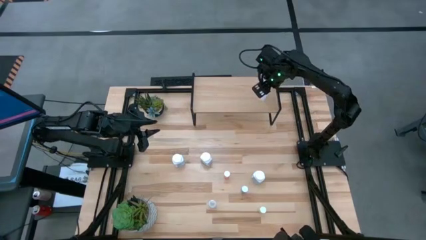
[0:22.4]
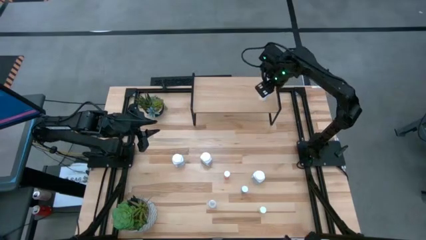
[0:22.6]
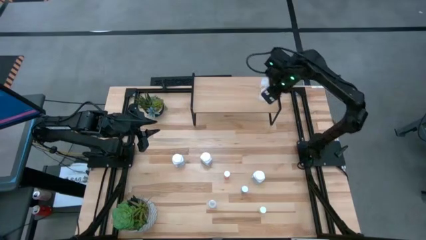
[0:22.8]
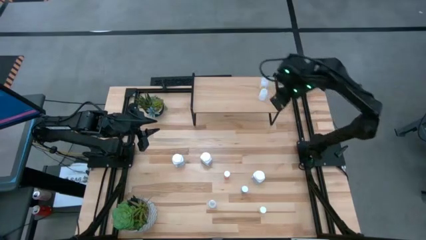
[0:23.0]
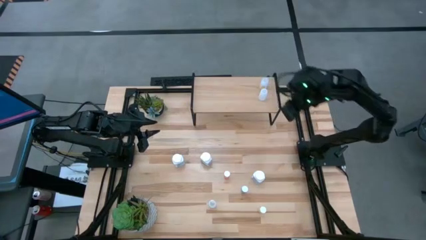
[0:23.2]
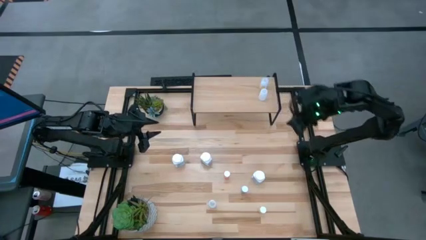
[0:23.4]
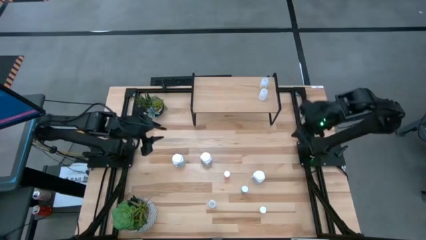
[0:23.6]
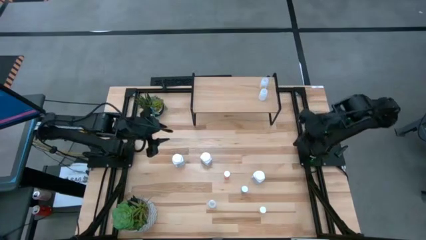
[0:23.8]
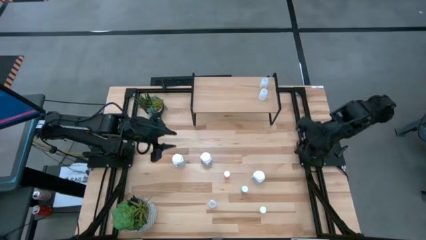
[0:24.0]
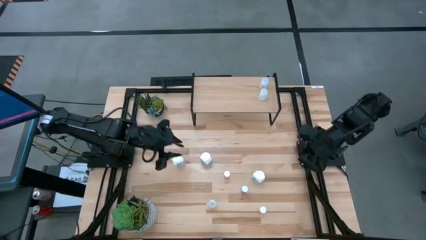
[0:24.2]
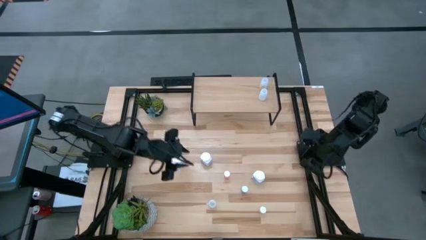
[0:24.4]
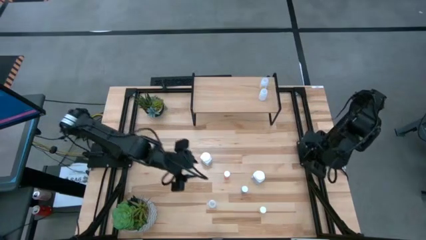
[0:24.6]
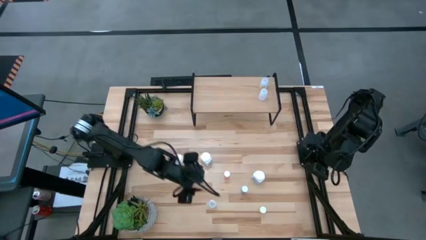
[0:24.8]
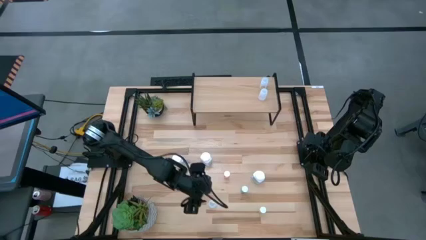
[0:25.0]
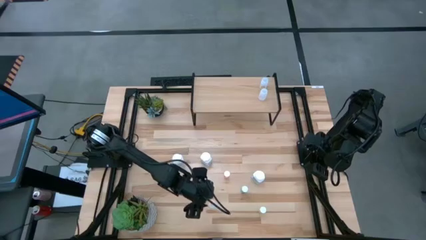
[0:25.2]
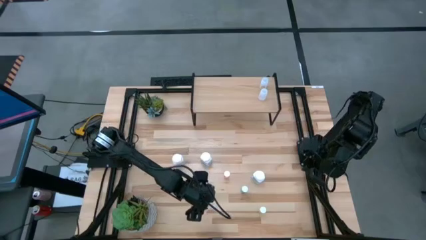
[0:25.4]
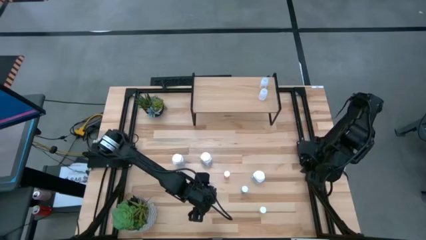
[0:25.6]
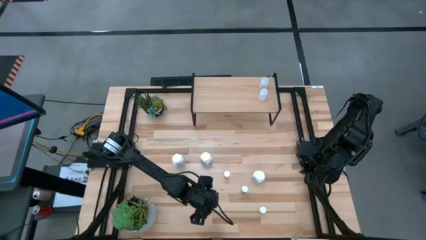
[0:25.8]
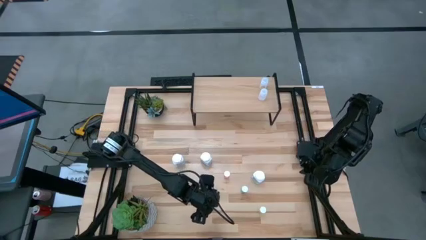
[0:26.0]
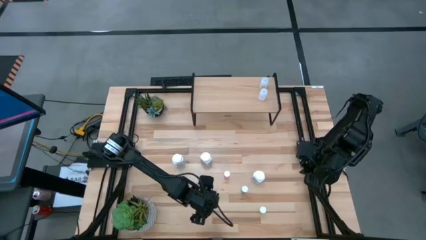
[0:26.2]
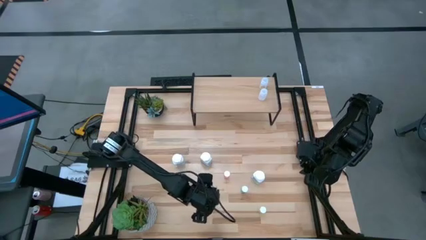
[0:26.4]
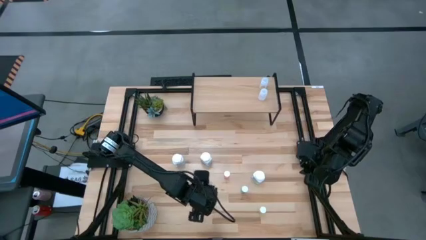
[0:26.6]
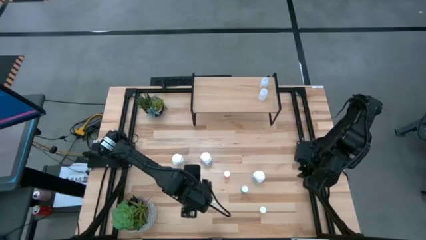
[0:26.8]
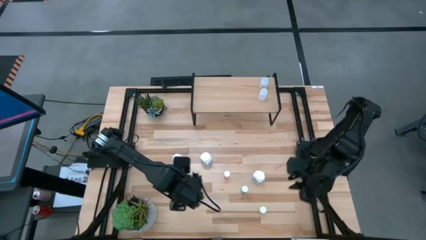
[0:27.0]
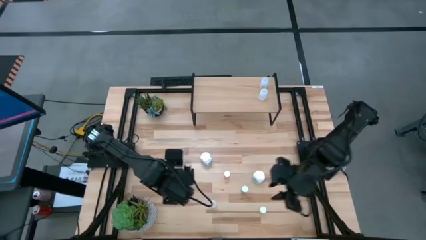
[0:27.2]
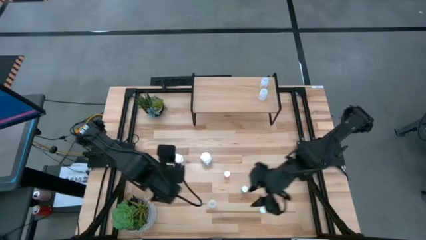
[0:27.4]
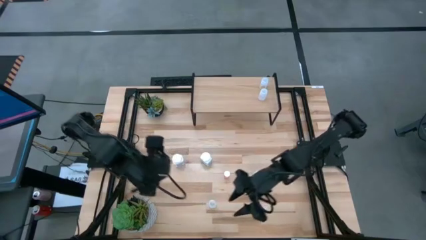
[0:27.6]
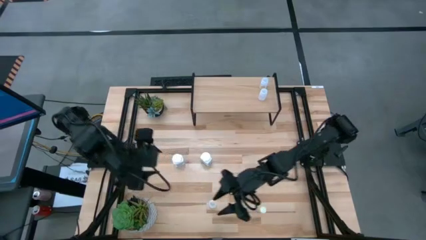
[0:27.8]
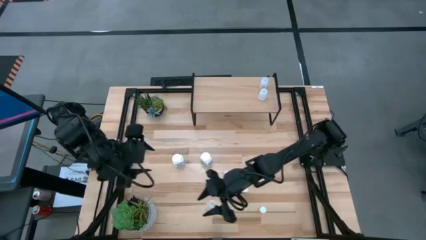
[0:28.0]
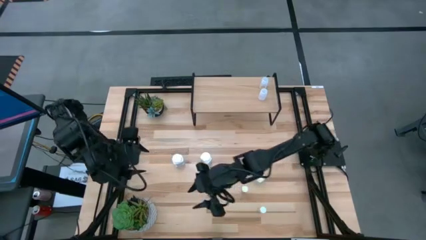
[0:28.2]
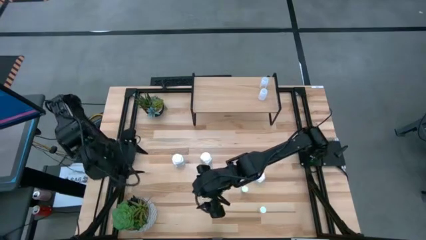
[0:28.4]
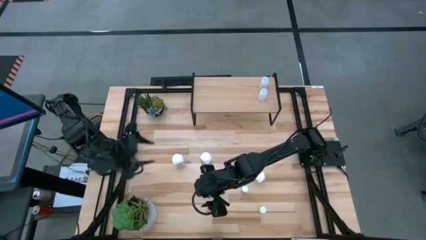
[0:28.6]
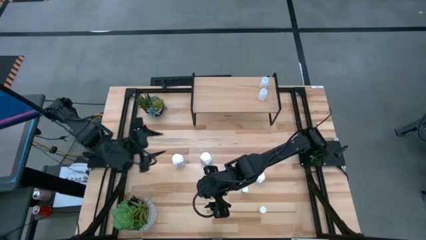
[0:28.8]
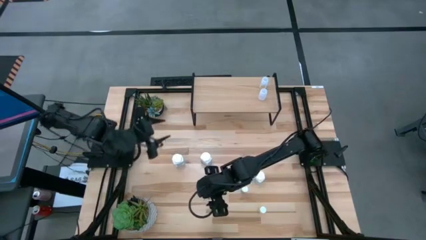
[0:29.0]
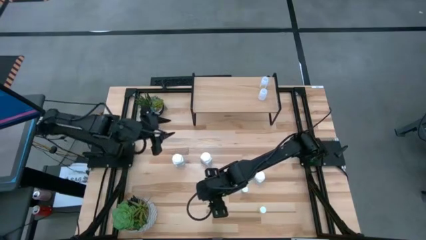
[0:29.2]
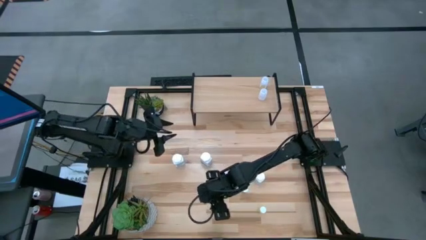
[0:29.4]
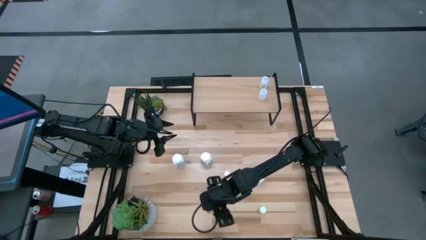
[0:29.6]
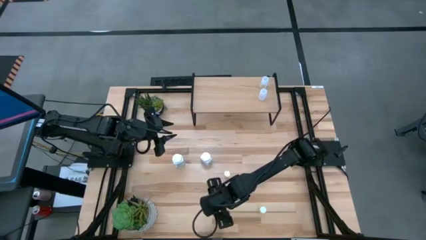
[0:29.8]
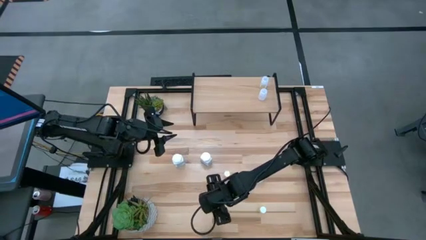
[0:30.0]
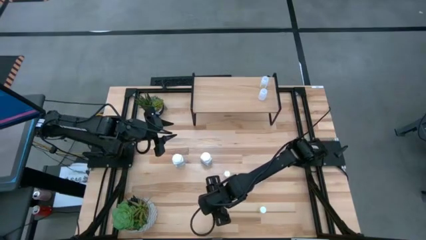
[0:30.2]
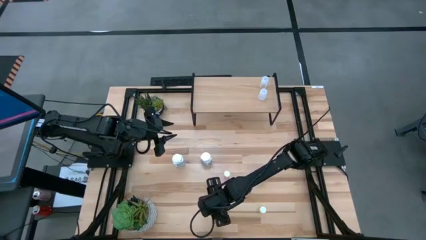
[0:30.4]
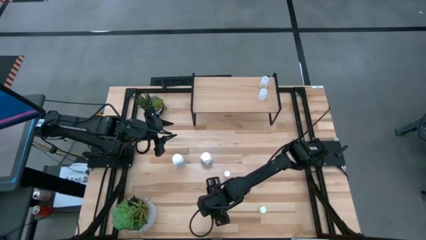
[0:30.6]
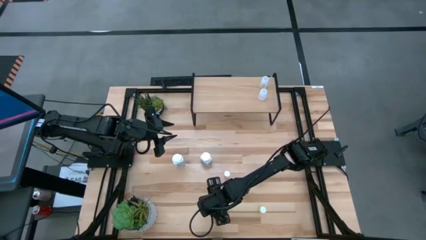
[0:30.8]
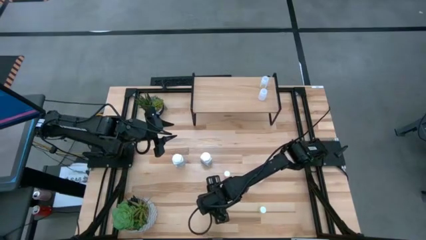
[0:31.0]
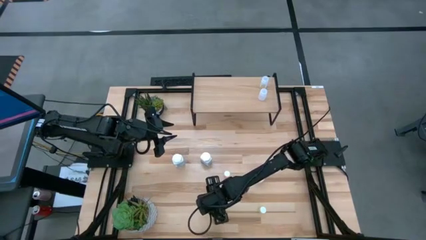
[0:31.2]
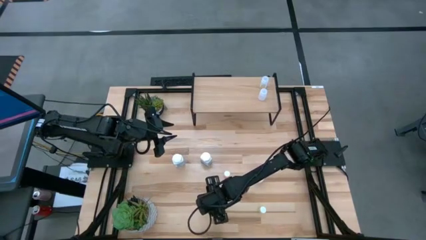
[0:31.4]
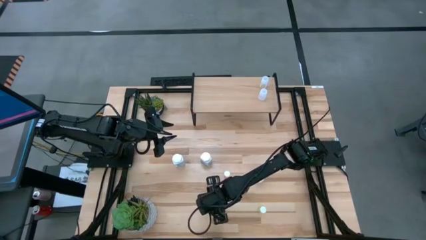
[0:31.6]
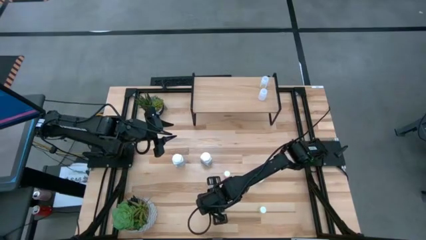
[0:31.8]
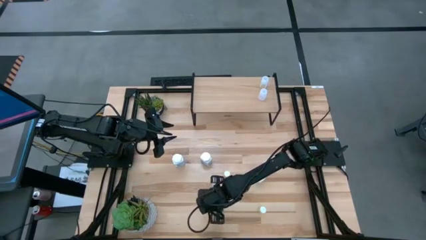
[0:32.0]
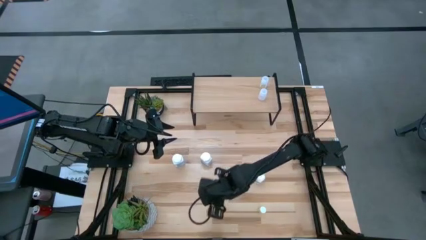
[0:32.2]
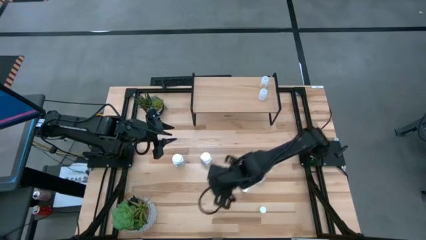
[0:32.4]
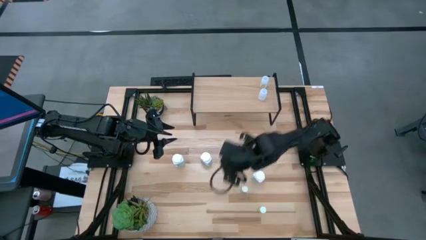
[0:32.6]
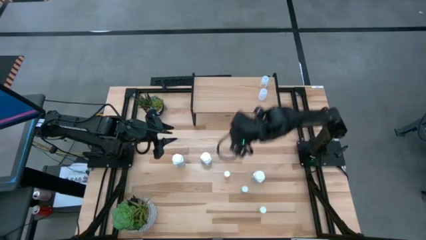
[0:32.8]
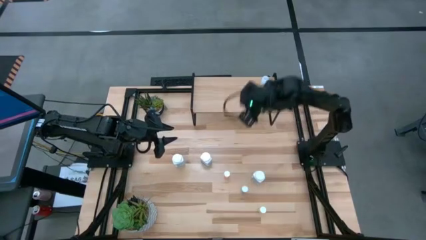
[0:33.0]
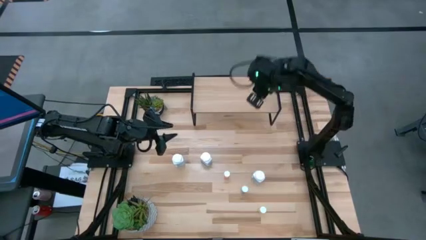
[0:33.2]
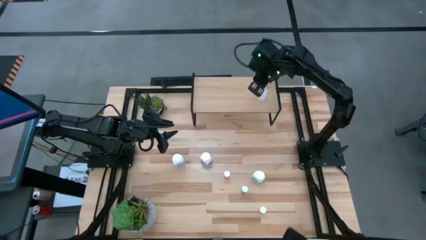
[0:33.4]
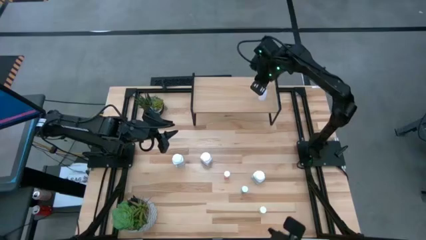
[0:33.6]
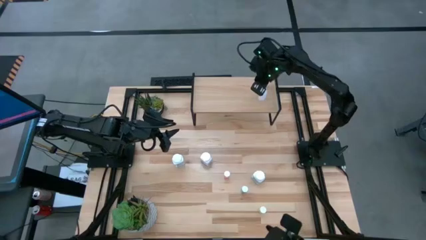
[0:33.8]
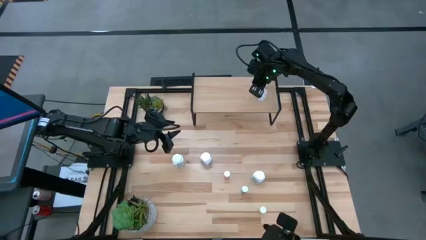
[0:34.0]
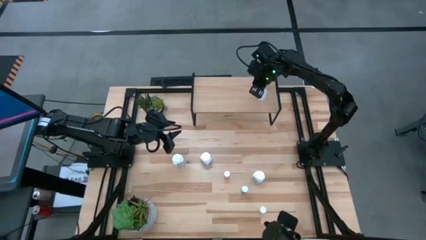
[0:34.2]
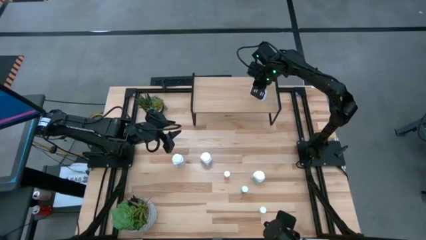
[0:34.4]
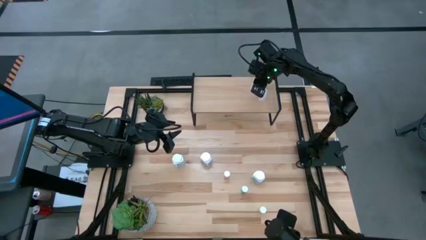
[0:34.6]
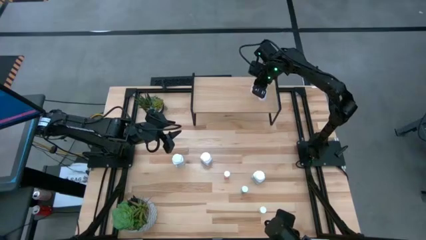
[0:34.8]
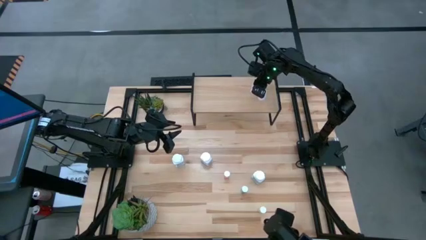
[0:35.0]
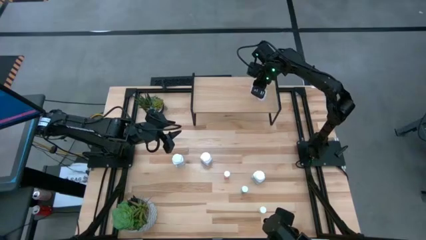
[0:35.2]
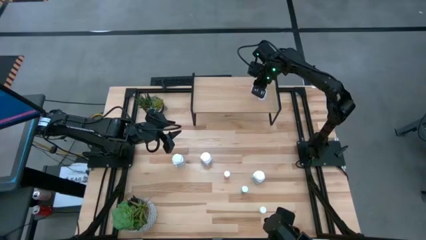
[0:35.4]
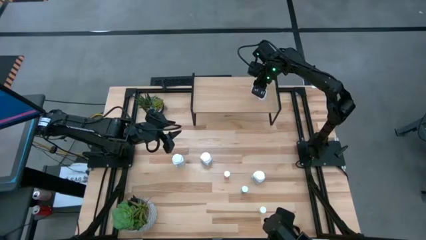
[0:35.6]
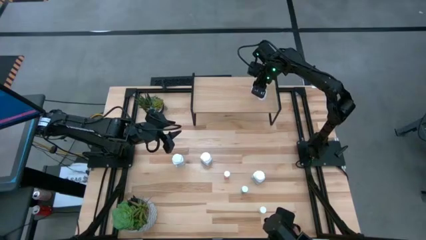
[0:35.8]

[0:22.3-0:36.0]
Task: Pick and place medicine bottles onto shelf by color
Put the transparent pill bottle on the shelf aligned with the other transparent pill bottles

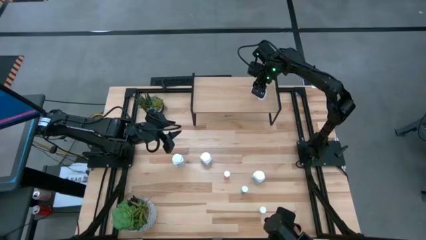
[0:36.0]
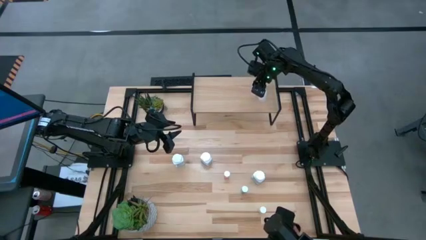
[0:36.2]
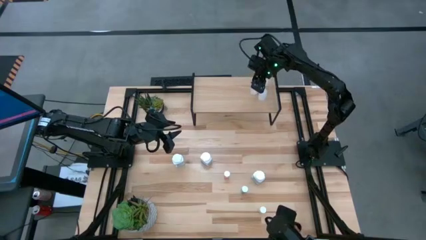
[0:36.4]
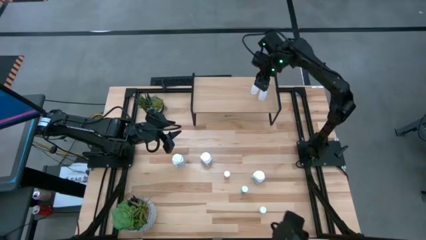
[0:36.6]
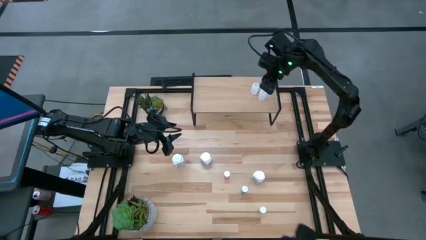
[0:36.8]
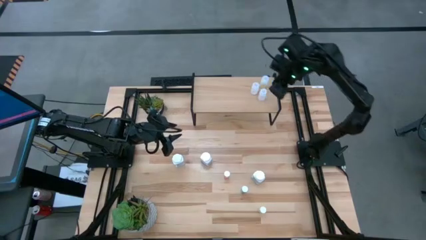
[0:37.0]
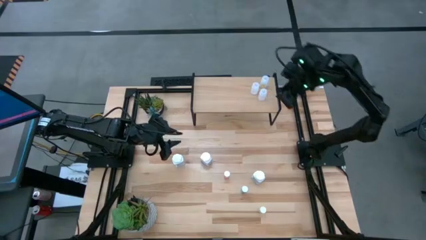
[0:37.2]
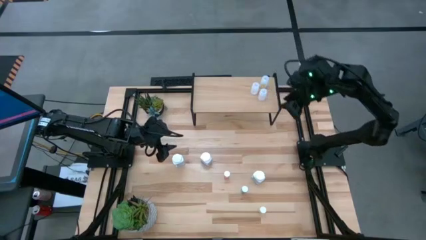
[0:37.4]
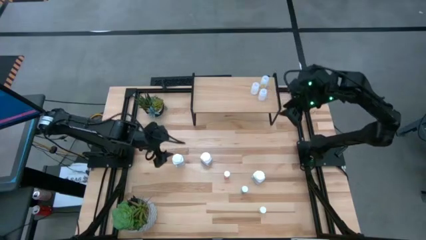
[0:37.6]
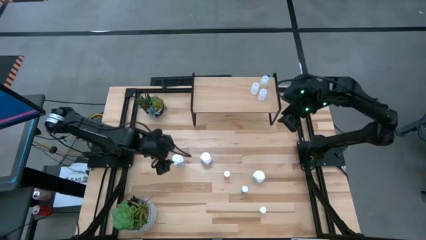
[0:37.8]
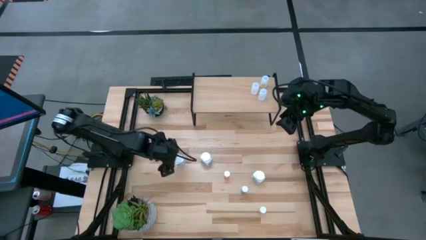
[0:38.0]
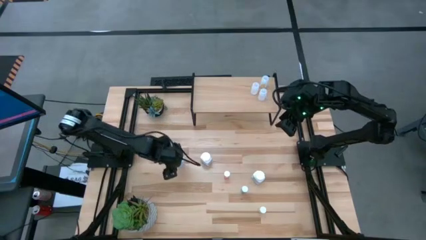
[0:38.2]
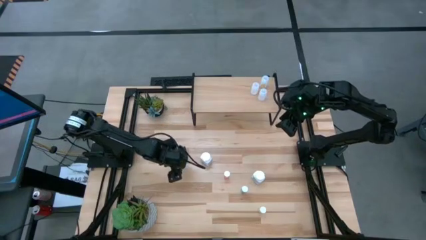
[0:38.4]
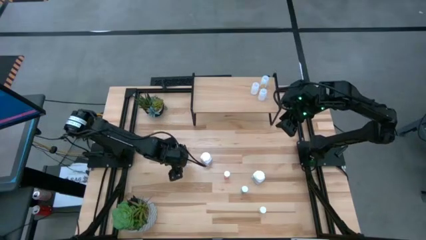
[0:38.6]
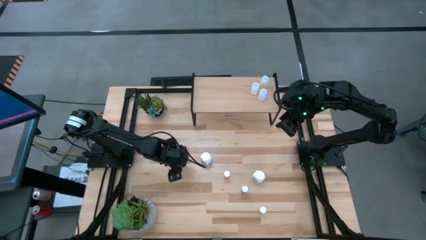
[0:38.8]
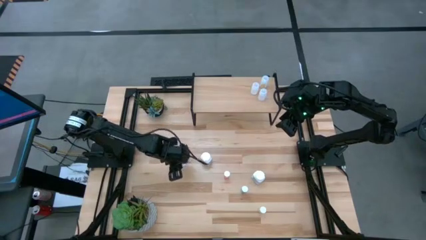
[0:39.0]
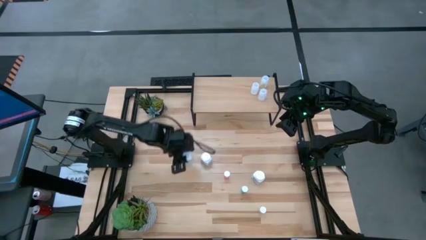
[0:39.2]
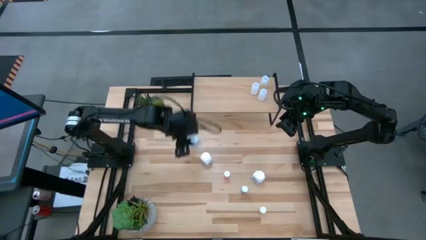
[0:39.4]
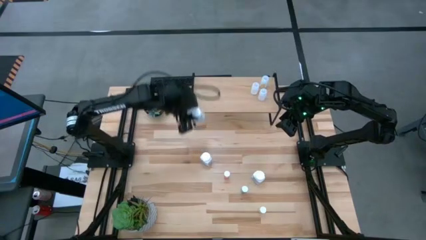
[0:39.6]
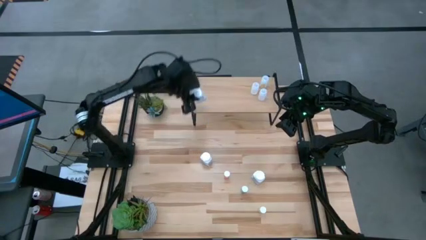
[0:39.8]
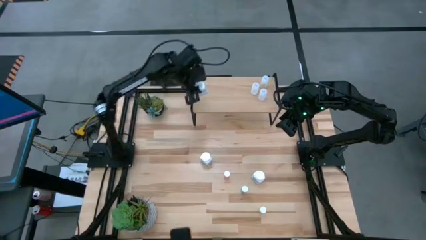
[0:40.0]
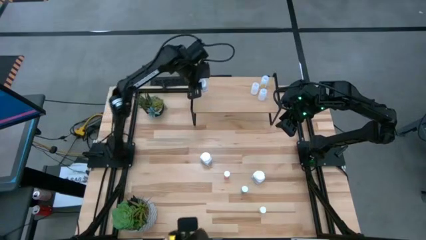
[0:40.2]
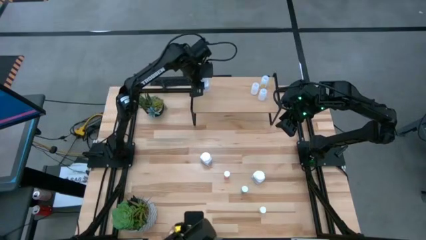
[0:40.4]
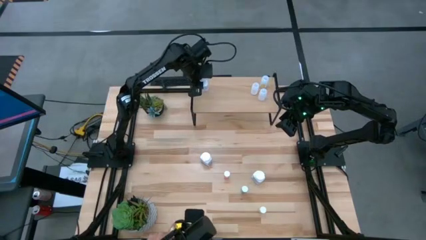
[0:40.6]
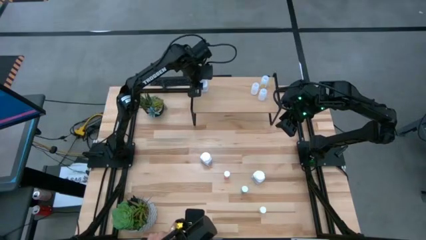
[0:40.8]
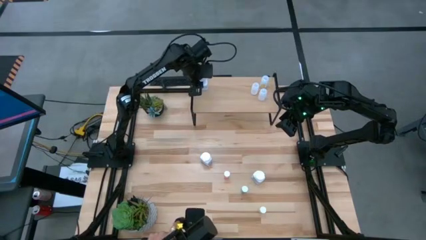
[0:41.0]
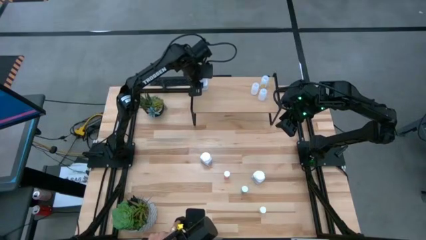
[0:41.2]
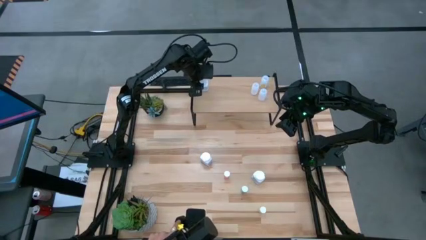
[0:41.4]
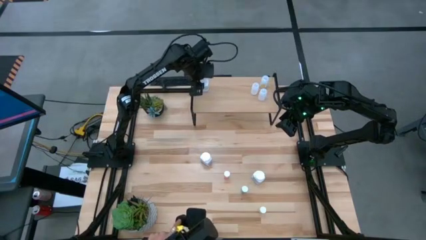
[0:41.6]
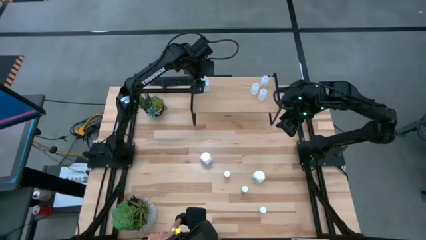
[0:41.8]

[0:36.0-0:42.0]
Put the top left white and blue pill bottle on the shelf
